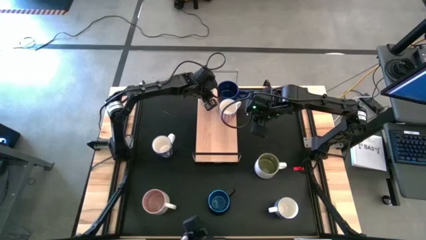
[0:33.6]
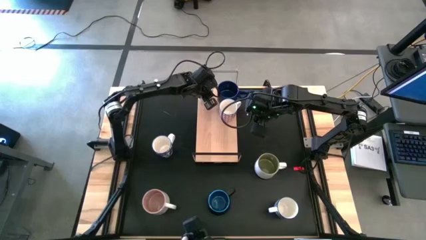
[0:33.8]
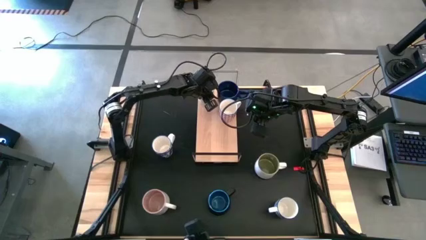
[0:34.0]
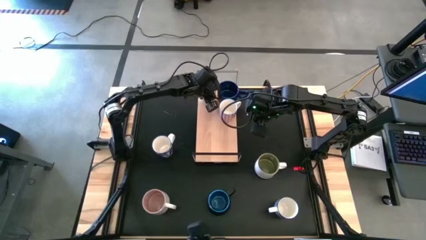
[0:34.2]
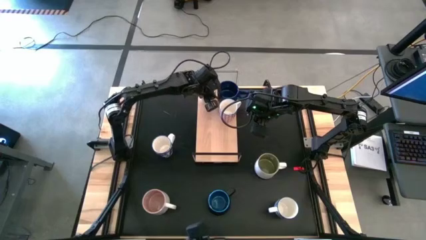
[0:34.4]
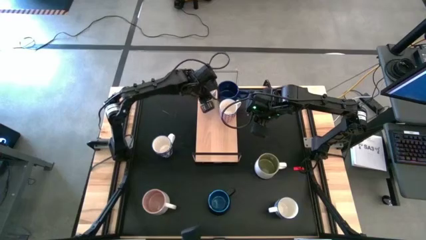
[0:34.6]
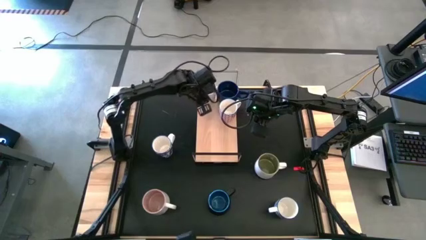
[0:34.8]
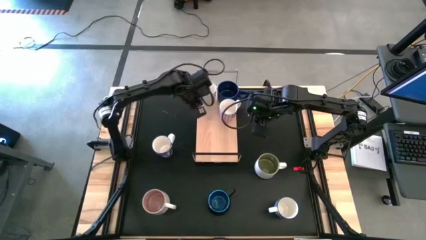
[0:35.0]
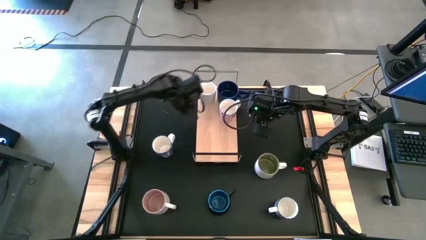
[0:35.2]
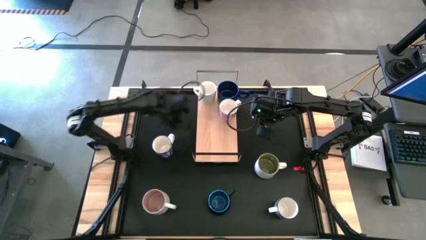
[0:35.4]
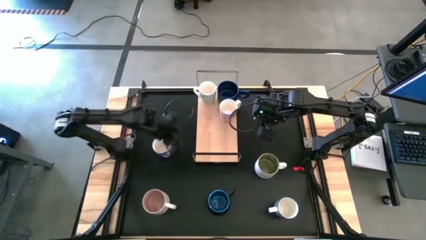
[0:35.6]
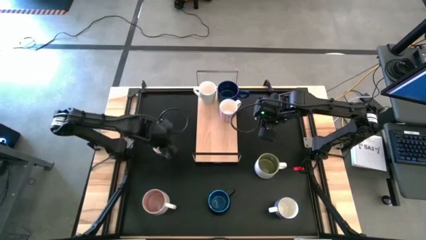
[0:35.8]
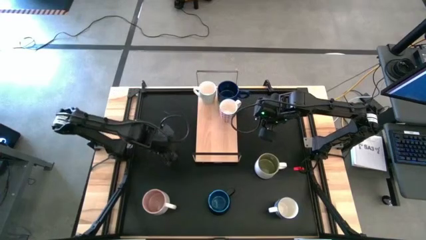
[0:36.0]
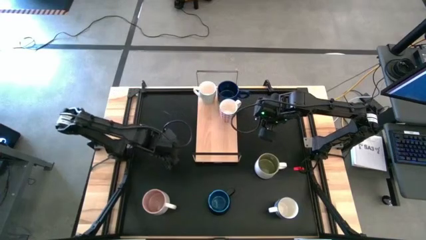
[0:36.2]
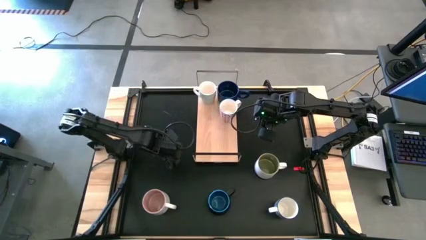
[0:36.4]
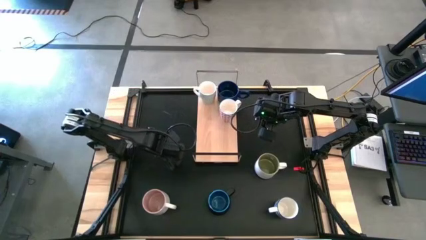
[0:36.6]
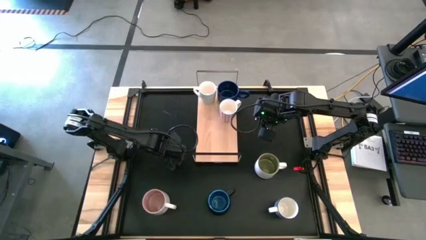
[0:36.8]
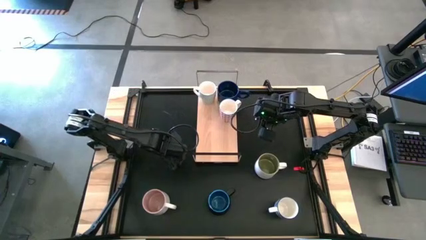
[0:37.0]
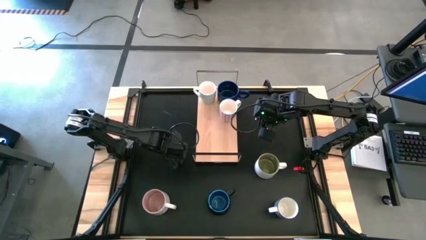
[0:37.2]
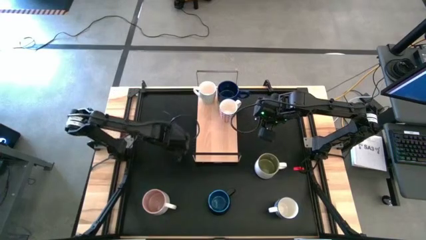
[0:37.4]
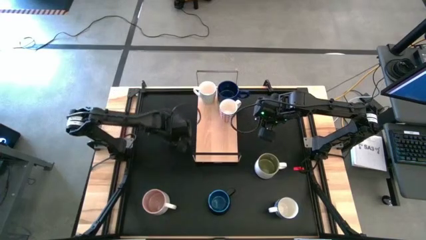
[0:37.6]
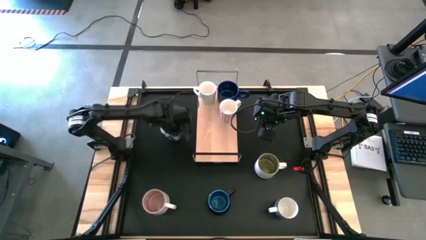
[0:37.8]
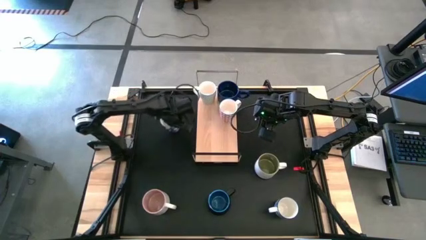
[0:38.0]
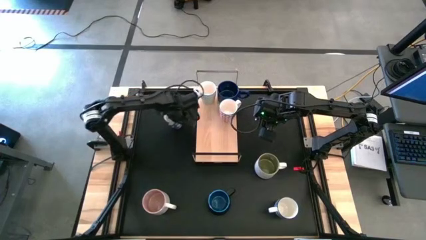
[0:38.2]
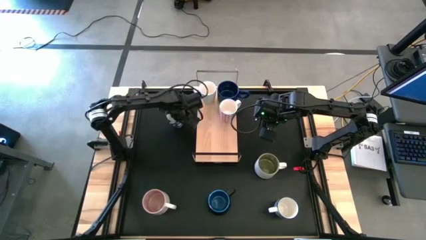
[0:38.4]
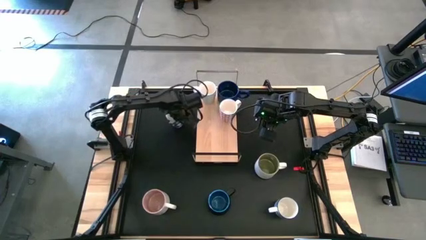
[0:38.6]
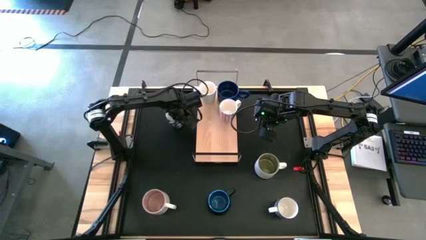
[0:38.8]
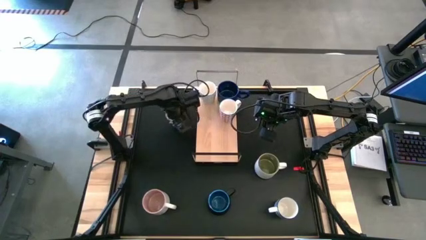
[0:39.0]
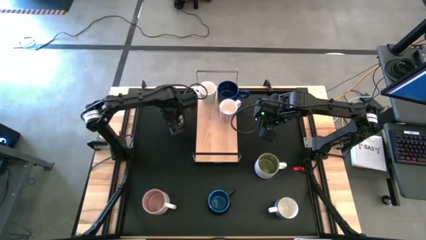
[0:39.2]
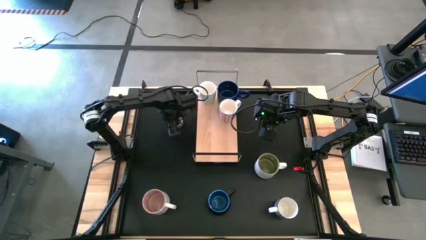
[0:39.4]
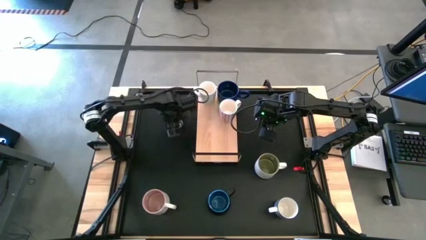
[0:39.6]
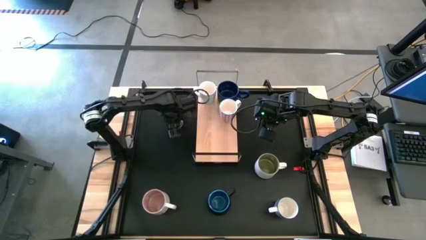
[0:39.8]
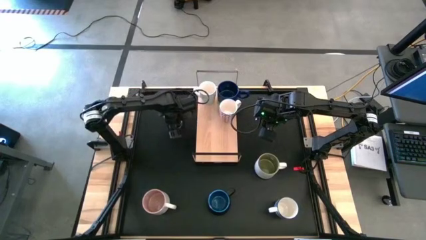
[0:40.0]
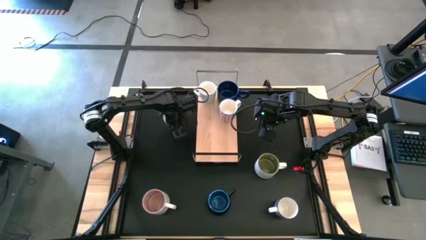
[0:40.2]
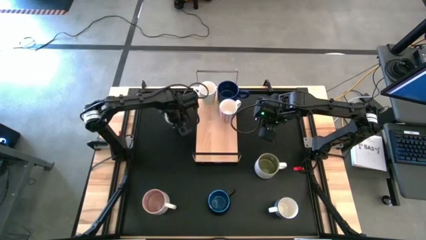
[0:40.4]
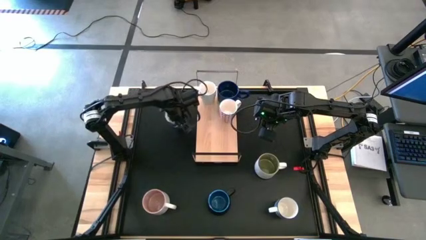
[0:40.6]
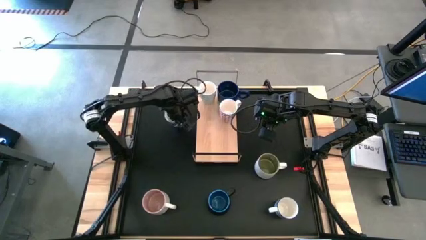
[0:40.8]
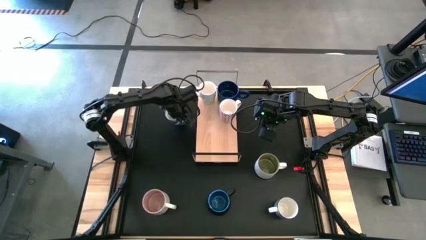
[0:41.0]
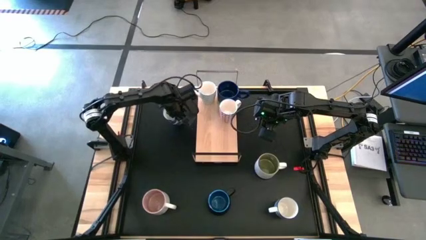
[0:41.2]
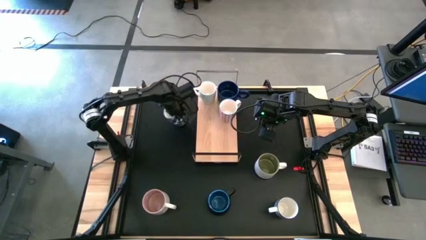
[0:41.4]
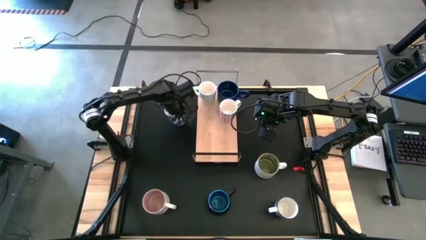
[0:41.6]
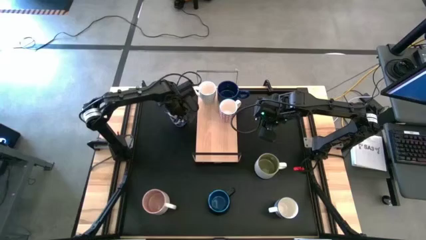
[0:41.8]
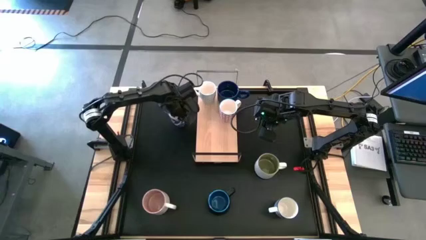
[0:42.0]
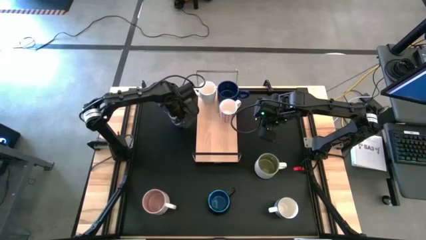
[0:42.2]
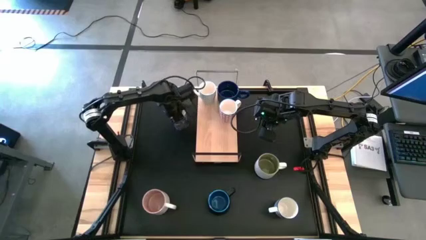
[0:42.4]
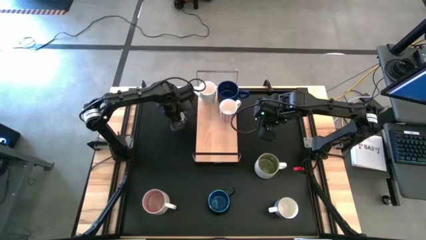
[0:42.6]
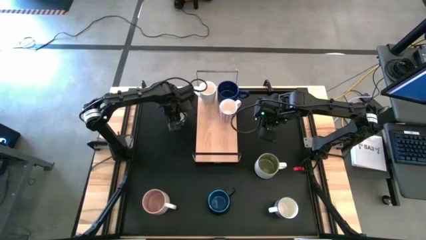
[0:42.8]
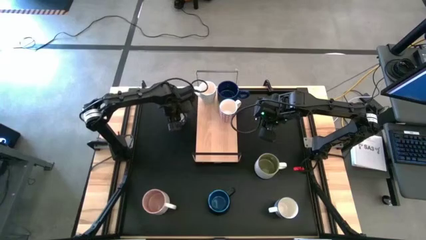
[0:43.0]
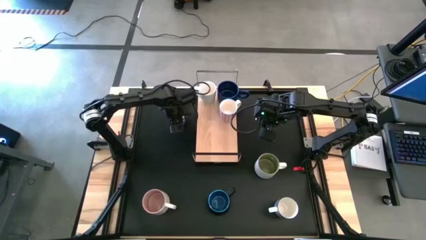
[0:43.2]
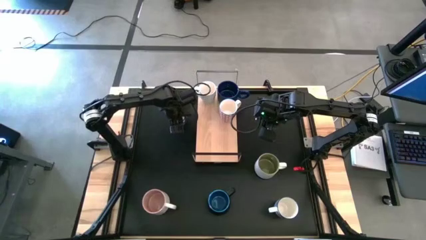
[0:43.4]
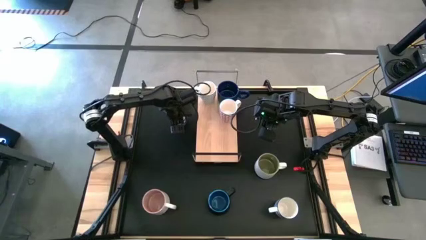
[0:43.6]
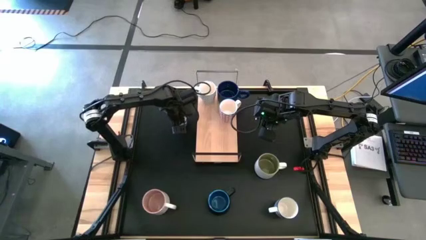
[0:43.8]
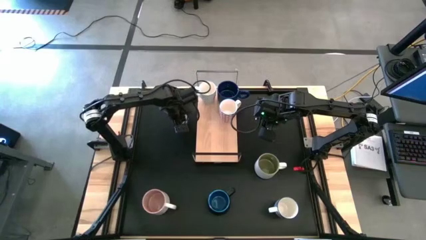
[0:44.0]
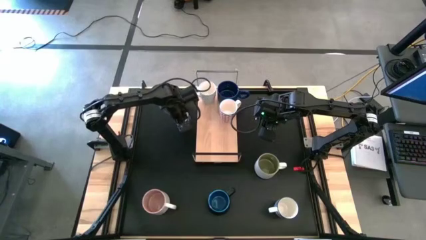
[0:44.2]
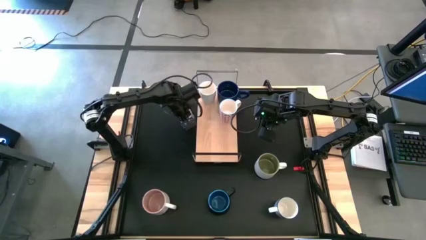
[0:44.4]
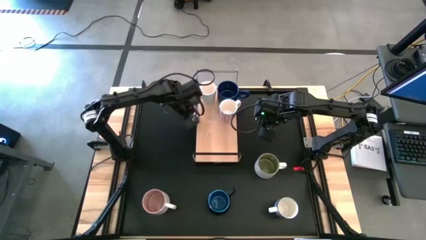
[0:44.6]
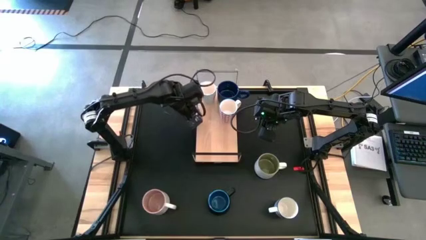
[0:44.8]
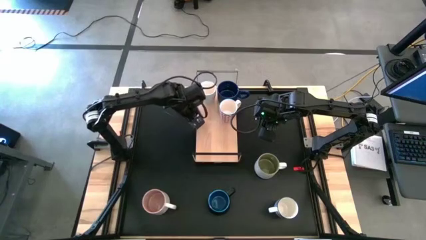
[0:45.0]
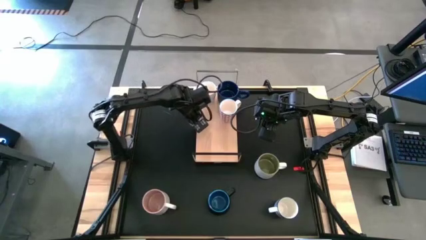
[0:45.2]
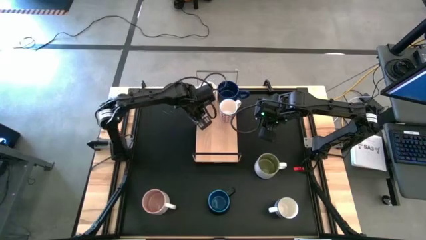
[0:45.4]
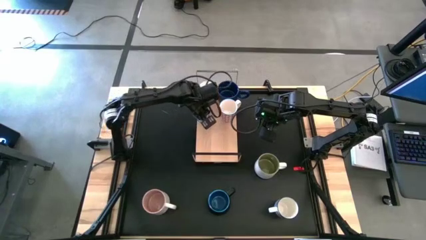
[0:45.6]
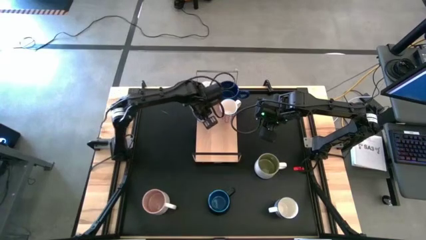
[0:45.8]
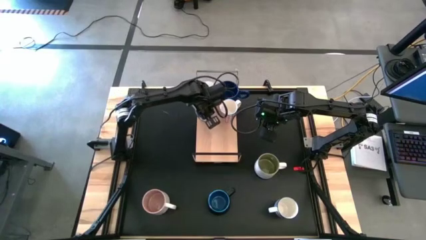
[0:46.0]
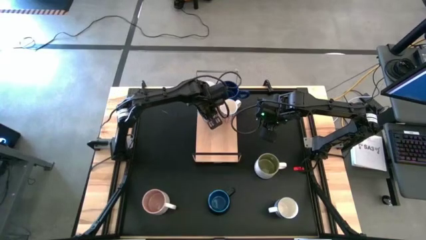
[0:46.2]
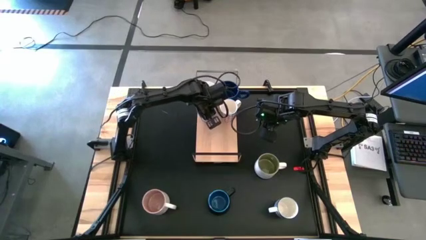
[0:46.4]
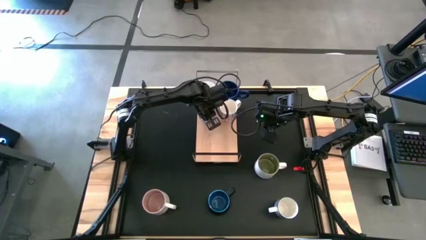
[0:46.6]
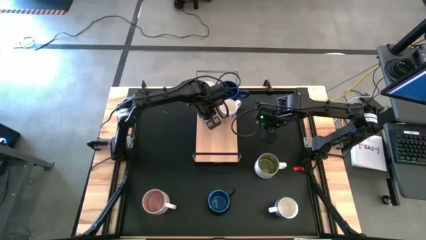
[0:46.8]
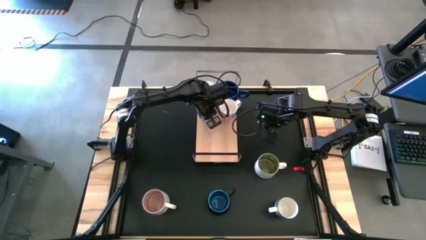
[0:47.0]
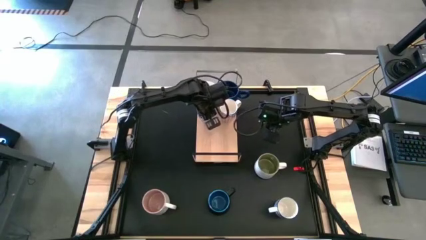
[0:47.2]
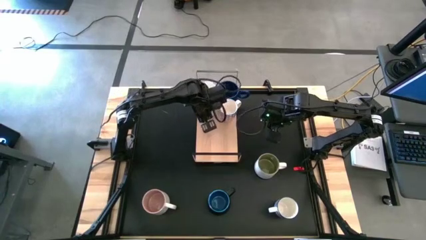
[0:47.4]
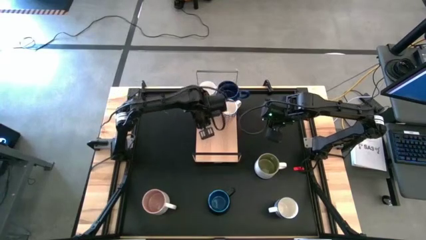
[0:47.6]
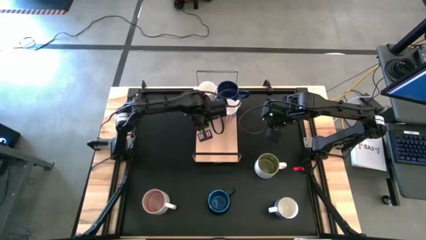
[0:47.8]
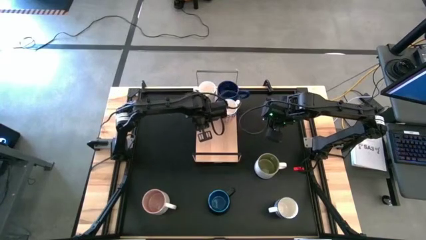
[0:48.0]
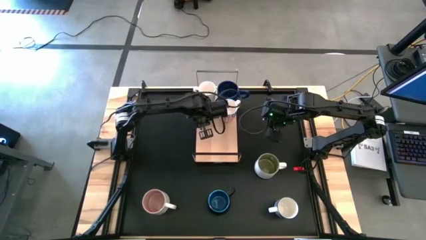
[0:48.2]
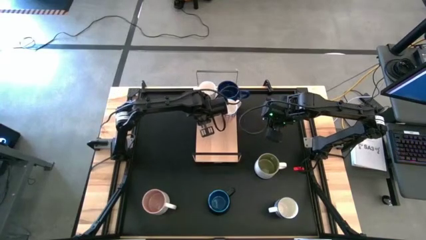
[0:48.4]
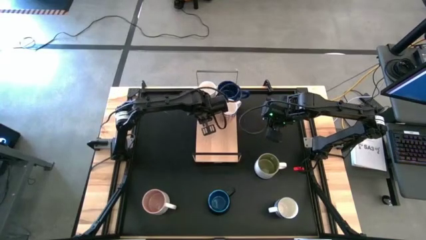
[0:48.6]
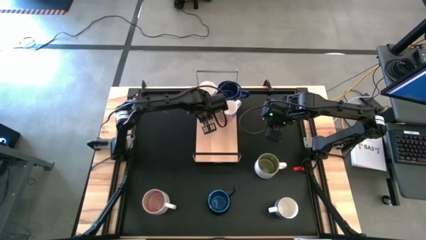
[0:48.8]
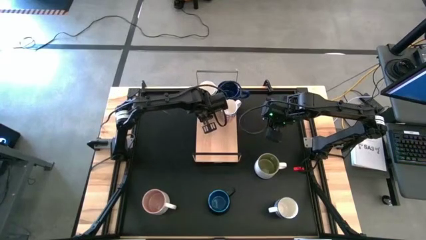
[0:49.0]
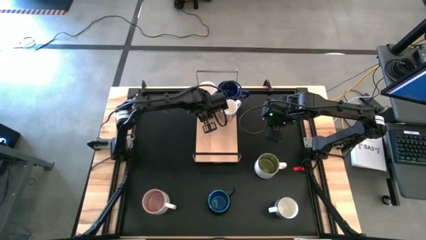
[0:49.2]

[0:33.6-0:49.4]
Task: Place coffee mugs
Put the left blue patterned mug on the shelf
